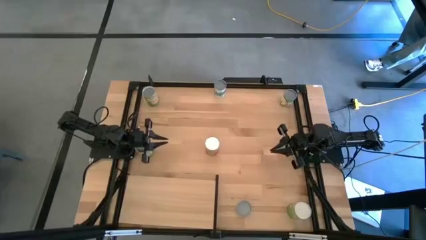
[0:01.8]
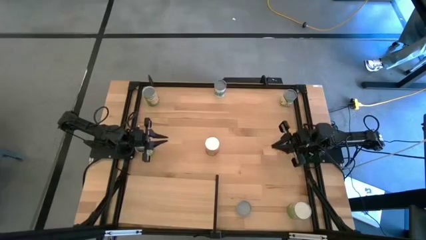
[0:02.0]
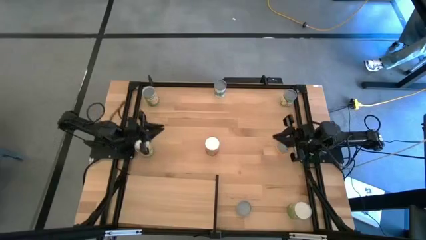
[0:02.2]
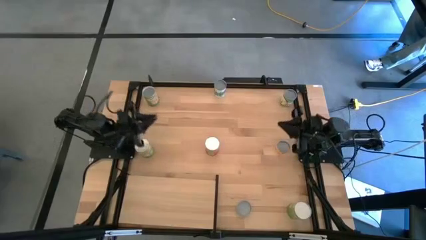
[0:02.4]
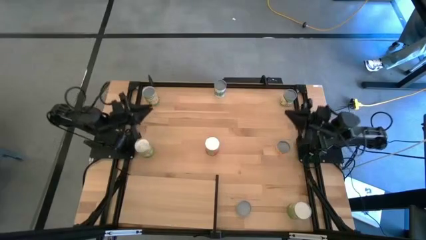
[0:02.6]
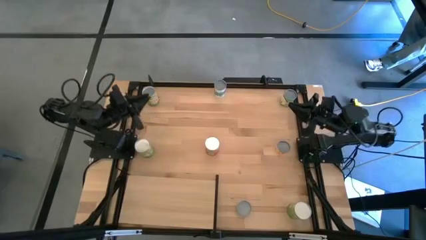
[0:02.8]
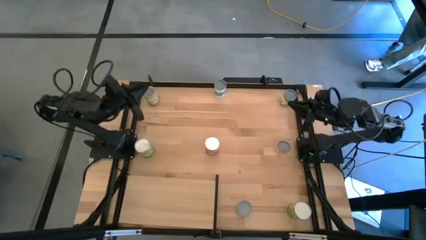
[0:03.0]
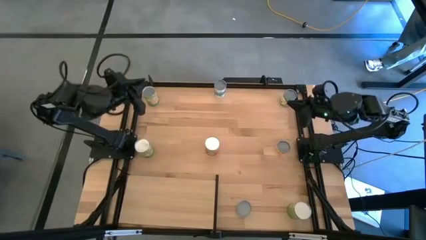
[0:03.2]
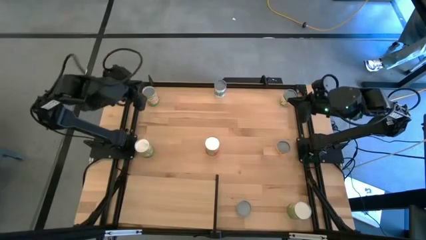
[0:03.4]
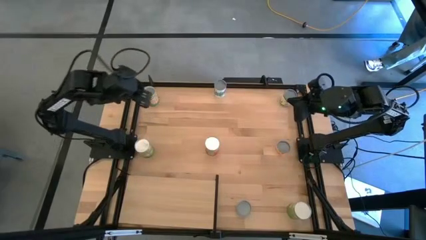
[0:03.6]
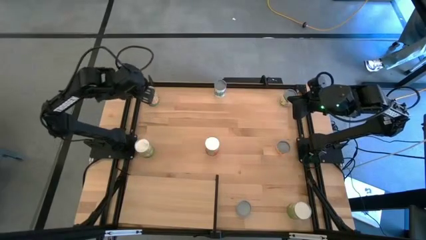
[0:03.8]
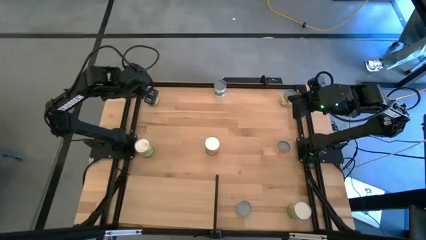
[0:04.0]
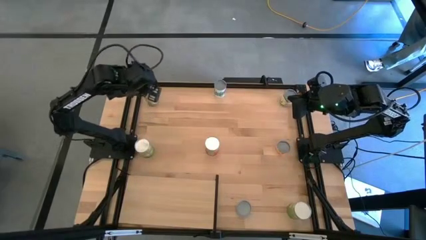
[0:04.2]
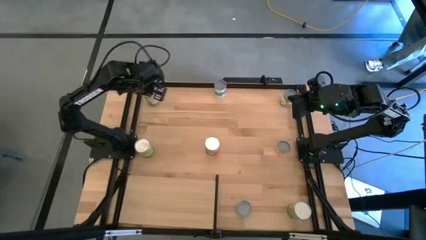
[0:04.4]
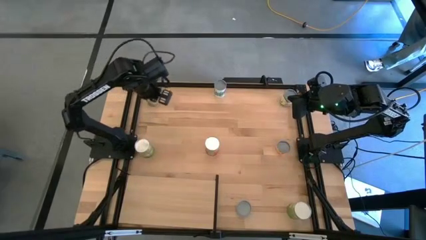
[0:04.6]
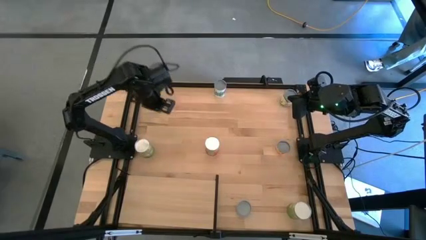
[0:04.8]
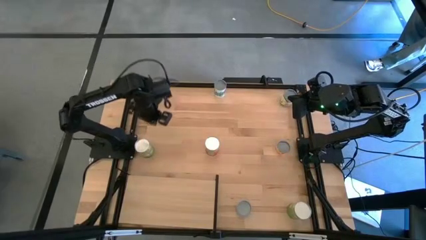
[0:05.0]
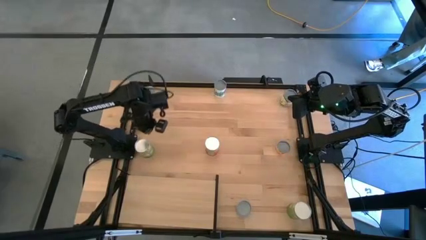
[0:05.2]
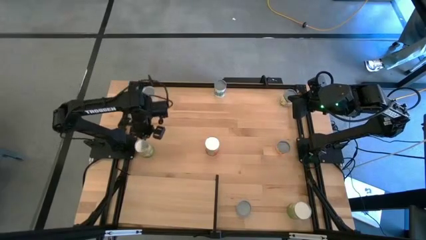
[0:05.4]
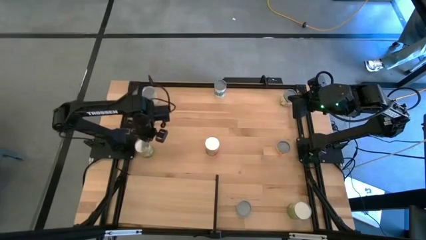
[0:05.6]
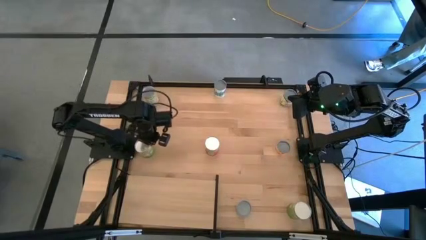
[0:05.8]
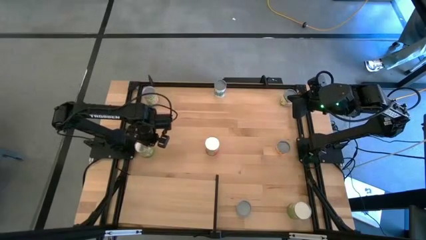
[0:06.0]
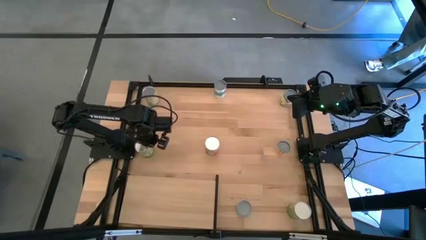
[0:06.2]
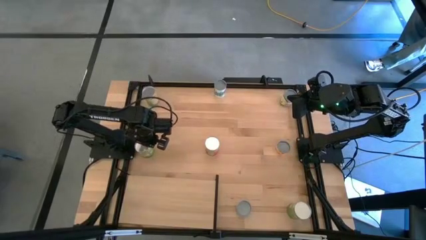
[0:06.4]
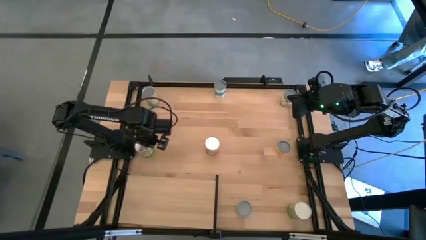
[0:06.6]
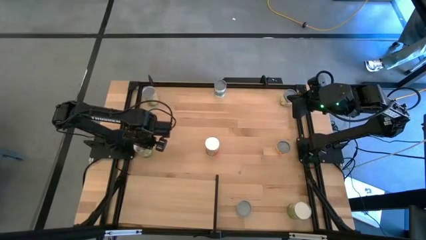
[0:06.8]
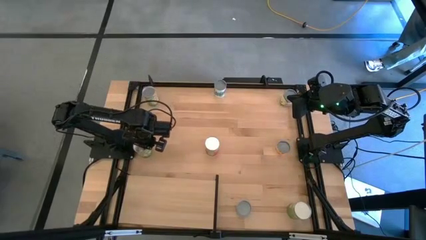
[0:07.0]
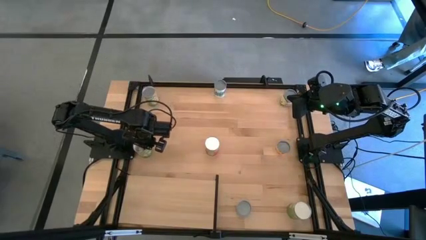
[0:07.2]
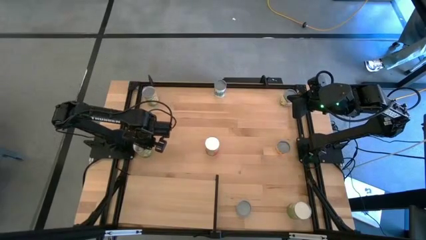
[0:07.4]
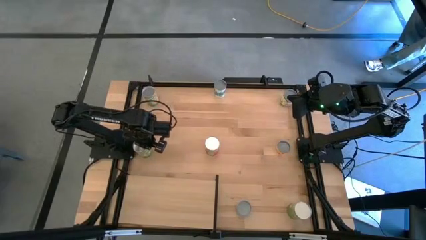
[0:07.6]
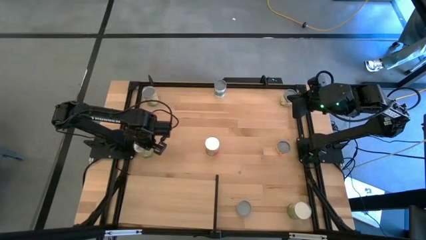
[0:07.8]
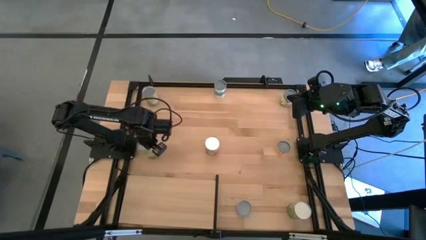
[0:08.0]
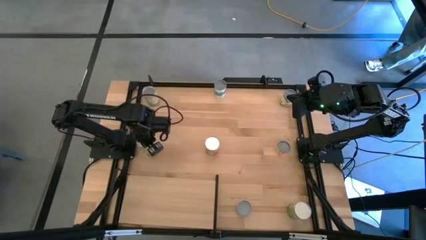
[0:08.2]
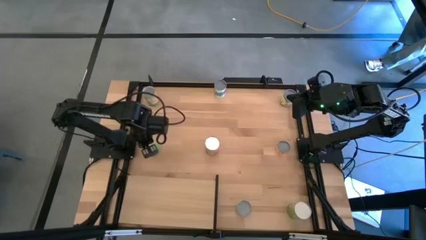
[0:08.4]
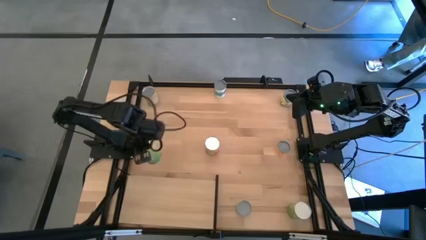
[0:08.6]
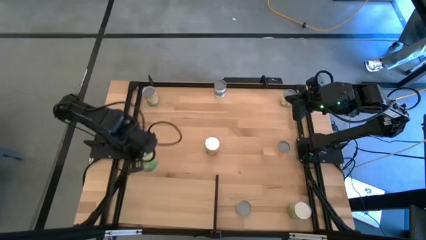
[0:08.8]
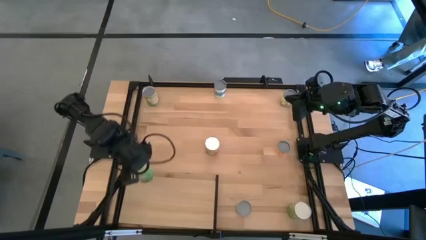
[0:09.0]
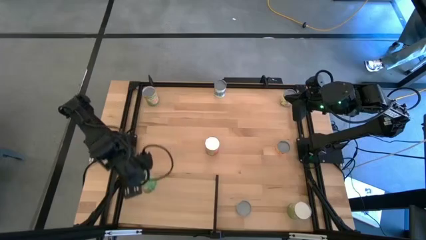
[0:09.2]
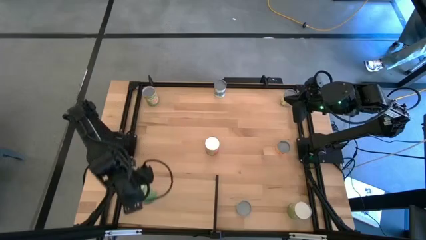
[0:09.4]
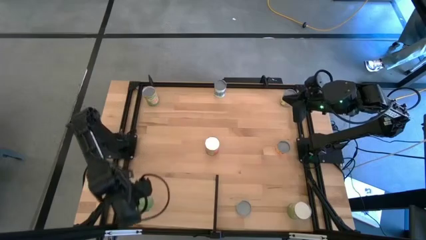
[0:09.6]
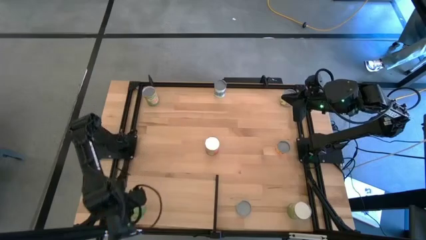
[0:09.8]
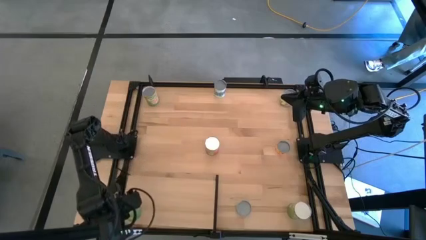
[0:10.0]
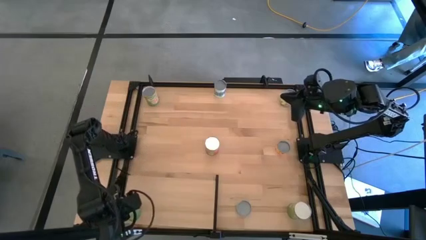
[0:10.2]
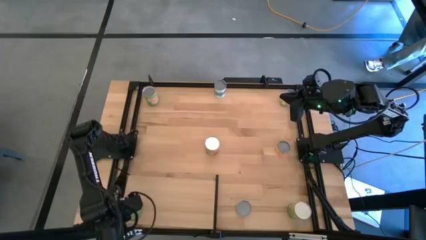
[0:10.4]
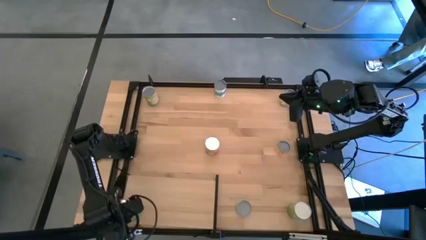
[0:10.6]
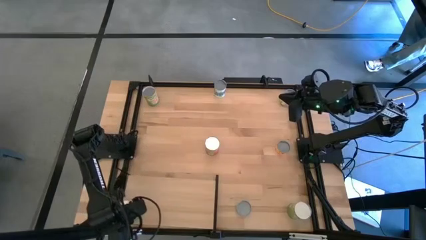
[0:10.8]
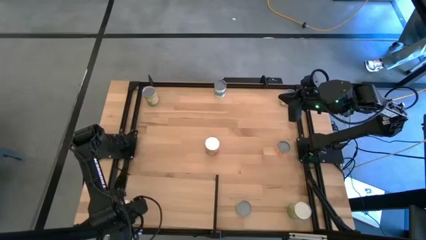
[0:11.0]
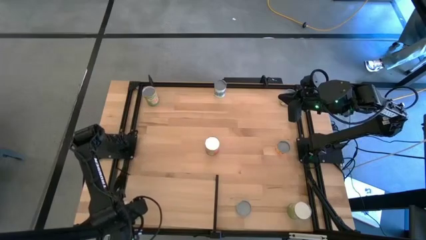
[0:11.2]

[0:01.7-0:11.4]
Task: Pick and place cans onto a shelf
Put the left canned peaches on the shelf

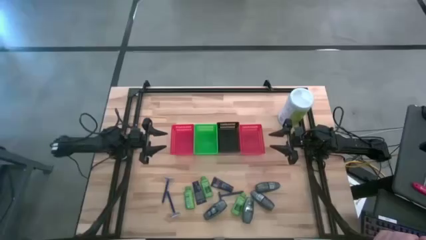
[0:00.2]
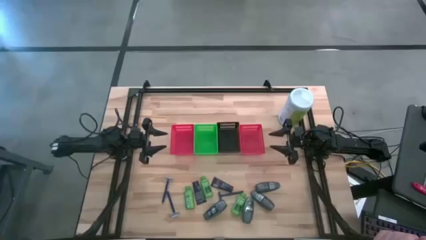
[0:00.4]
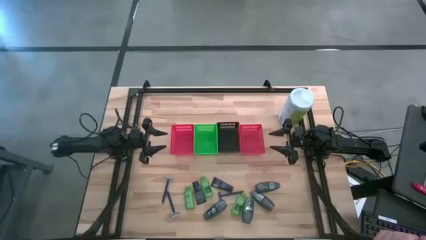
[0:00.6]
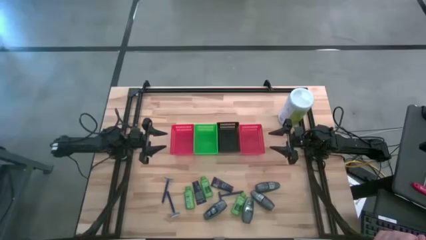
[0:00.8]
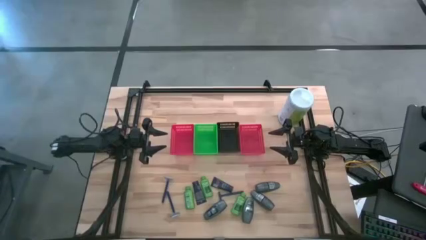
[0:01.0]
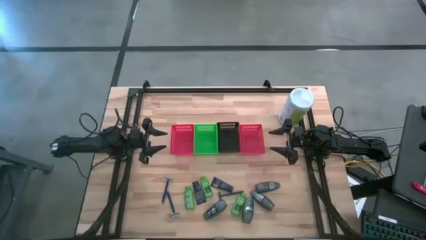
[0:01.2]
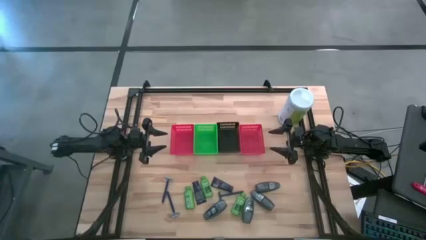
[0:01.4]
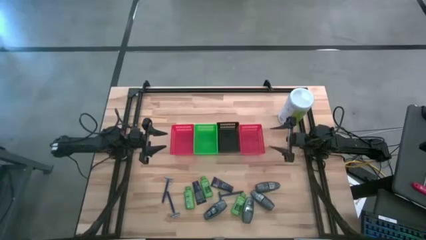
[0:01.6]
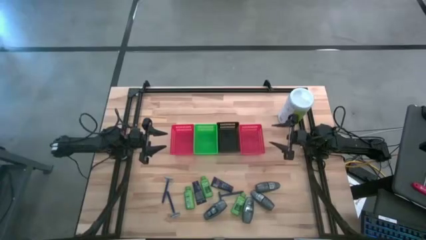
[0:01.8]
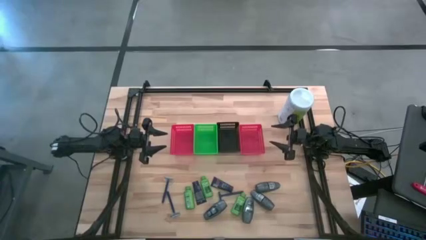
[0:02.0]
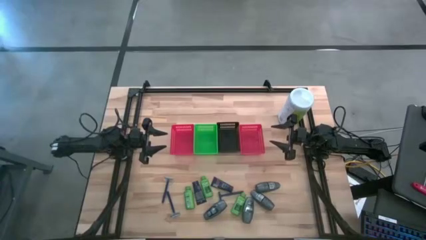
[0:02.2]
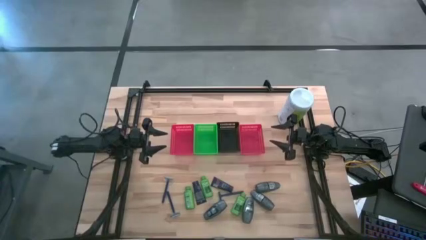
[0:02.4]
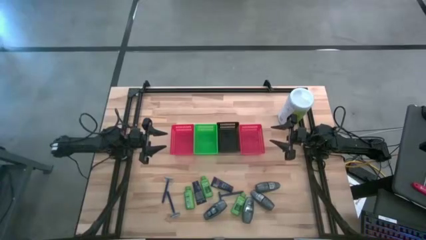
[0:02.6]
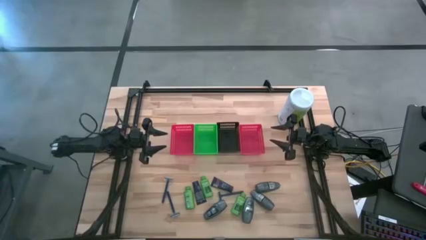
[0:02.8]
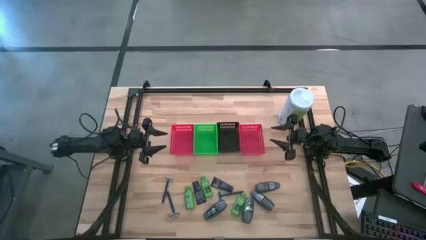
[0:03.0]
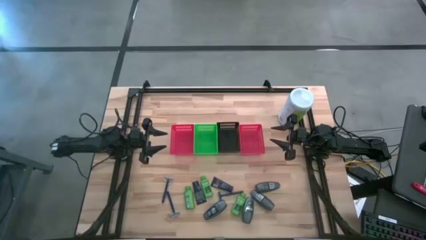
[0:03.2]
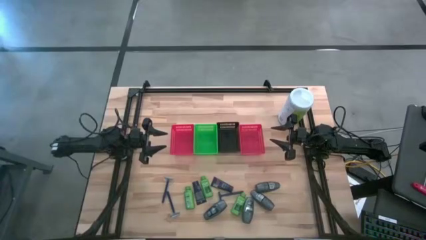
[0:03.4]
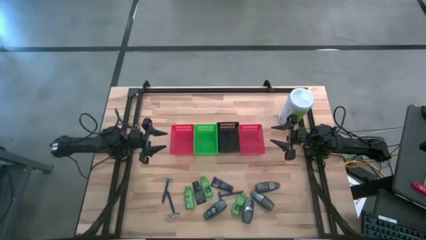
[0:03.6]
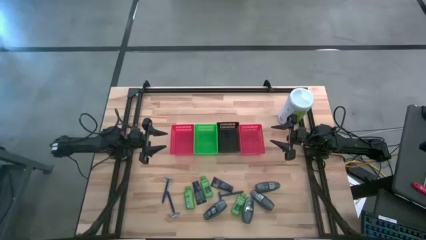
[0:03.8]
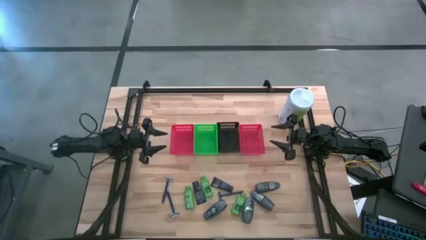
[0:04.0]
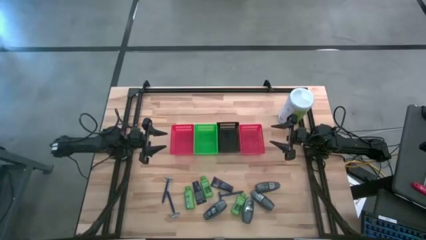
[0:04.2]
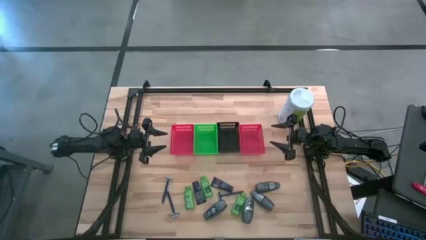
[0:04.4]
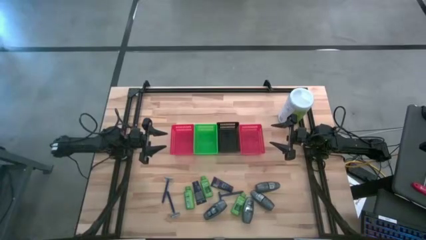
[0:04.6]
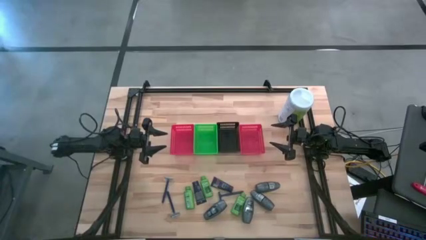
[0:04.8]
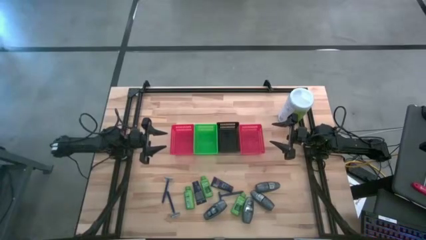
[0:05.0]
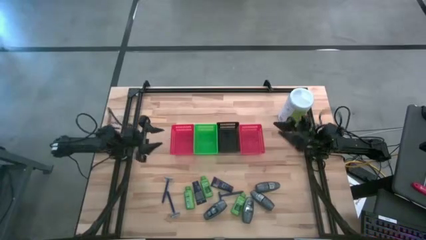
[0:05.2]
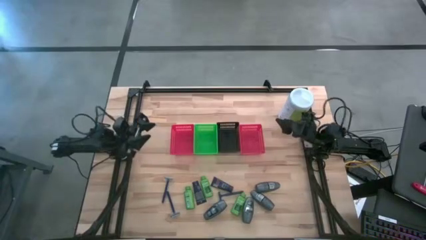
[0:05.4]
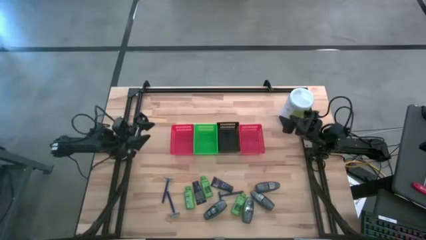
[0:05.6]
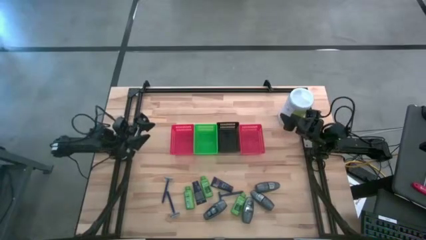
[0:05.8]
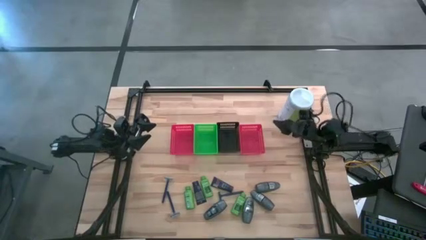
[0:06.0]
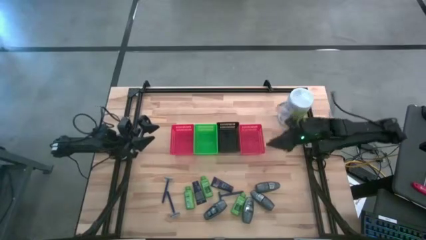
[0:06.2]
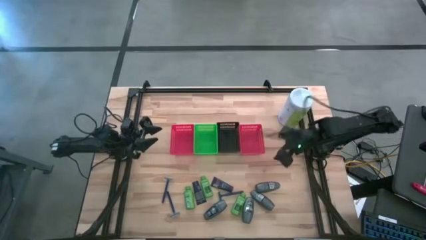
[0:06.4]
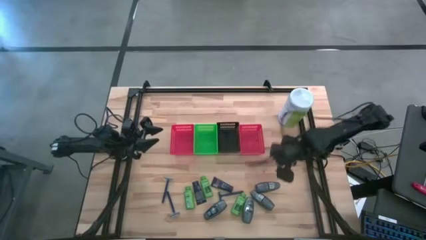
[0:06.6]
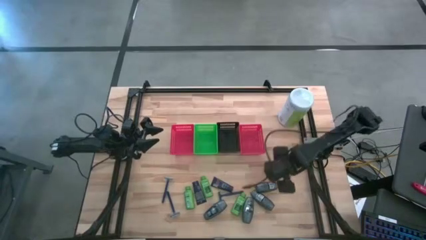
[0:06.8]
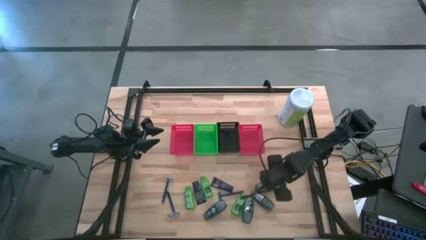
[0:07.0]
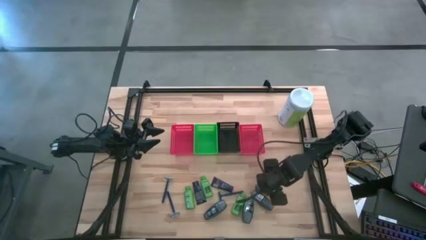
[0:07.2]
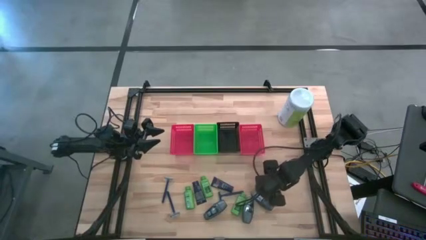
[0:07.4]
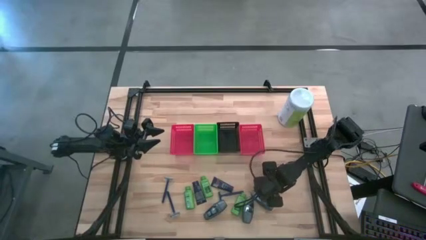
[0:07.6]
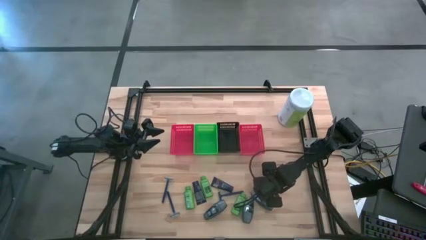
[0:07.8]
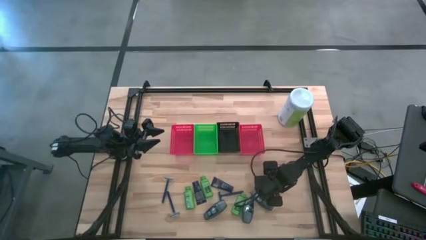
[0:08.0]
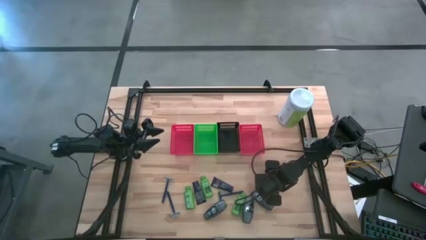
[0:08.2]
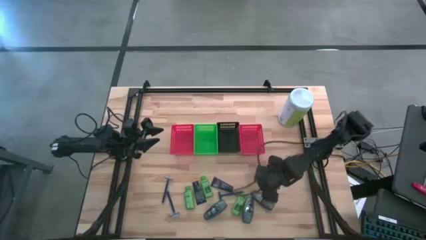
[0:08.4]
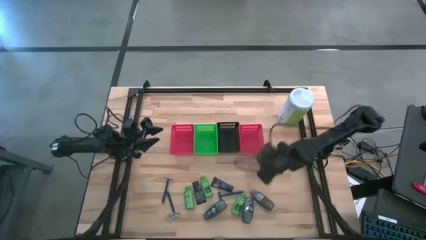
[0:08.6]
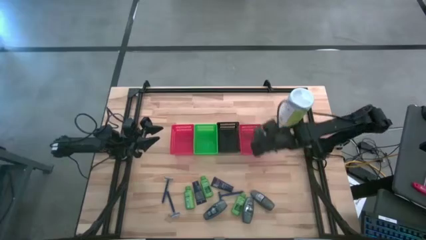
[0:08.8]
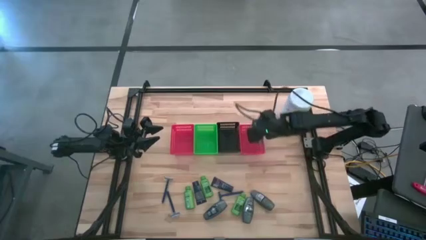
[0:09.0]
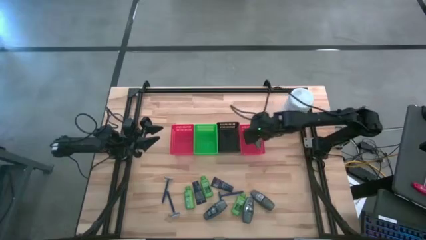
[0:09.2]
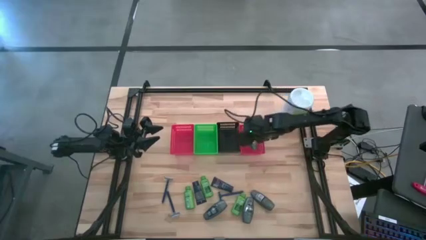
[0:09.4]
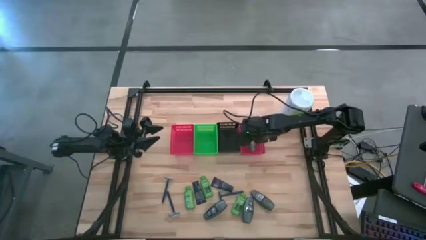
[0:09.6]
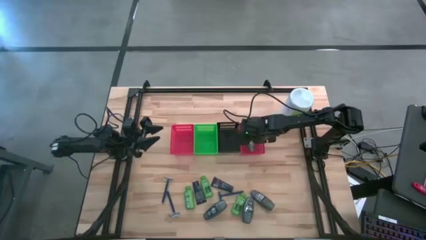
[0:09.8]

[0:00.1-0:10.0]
Task: Pick & Place Travel size toiletries
Put the black deodorant into the right red bin
